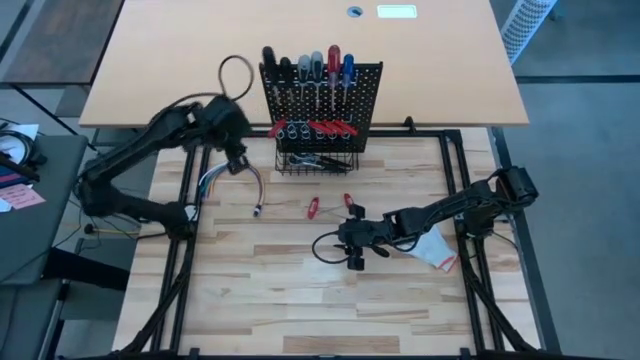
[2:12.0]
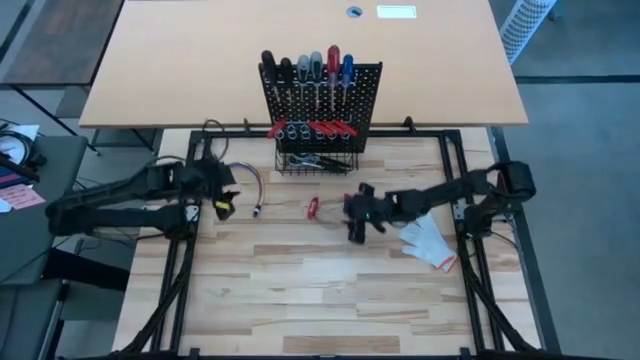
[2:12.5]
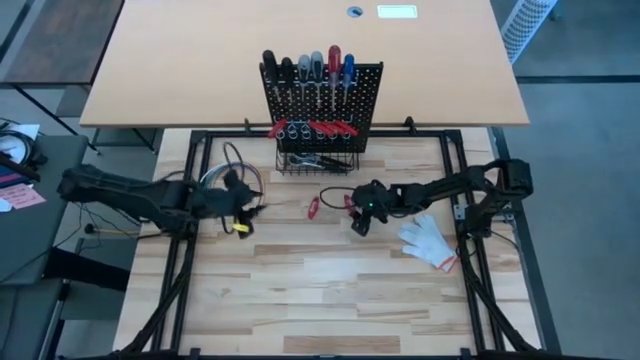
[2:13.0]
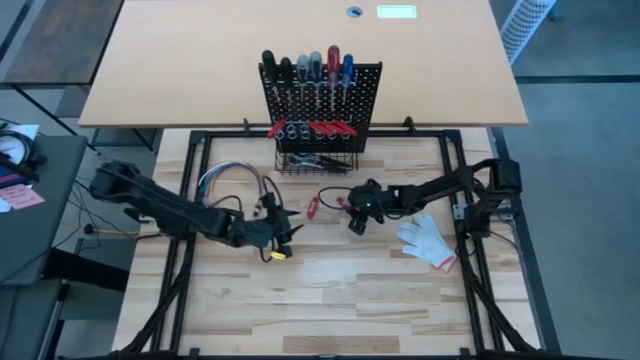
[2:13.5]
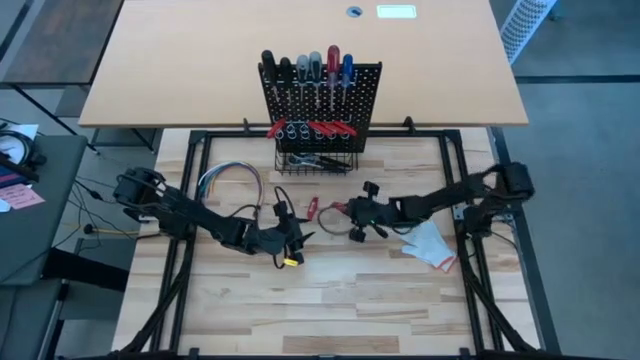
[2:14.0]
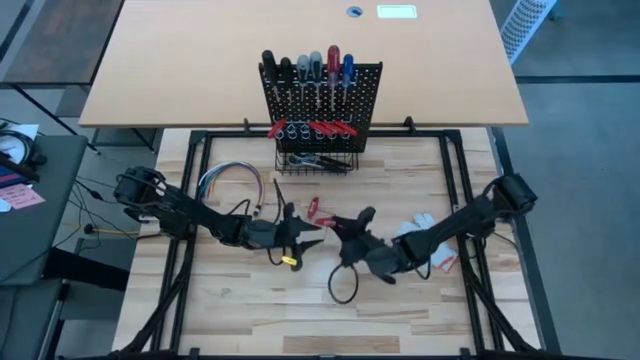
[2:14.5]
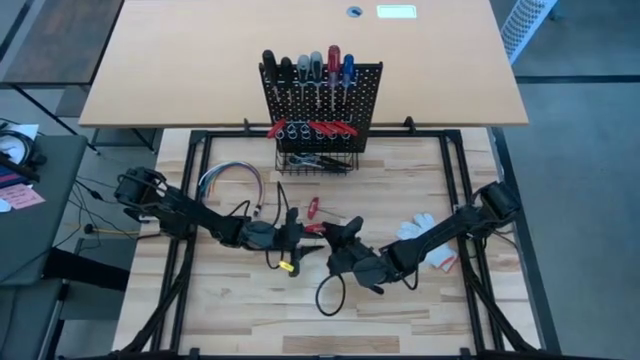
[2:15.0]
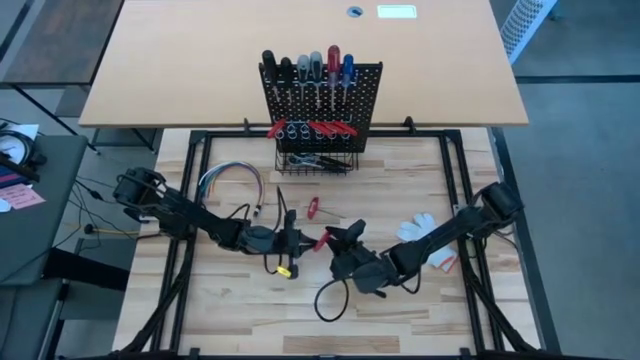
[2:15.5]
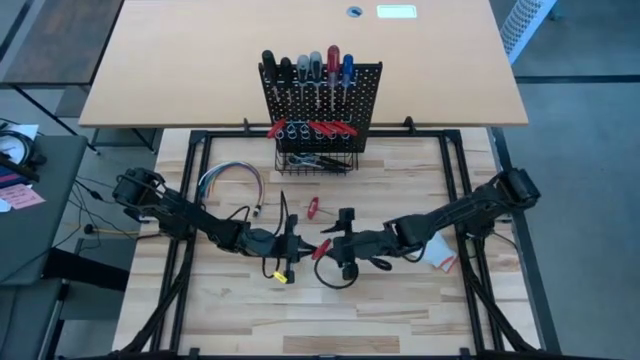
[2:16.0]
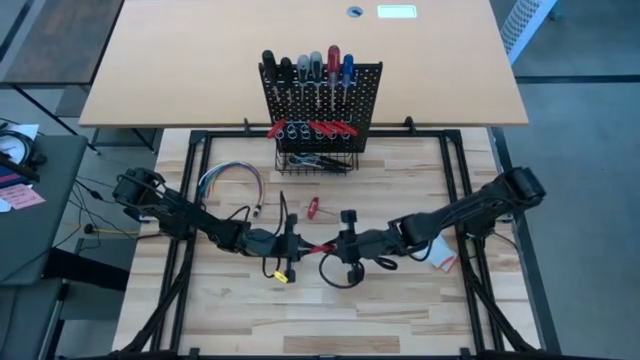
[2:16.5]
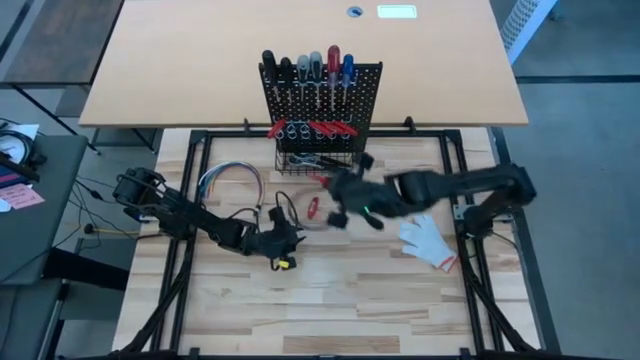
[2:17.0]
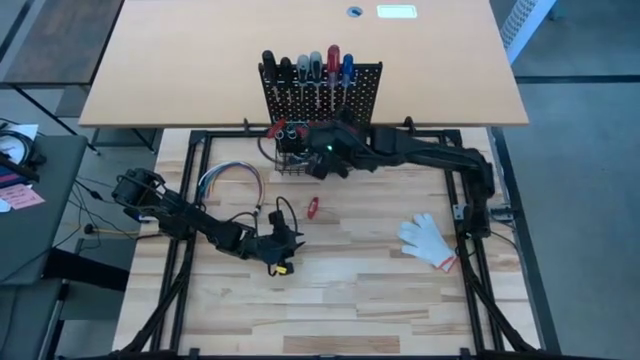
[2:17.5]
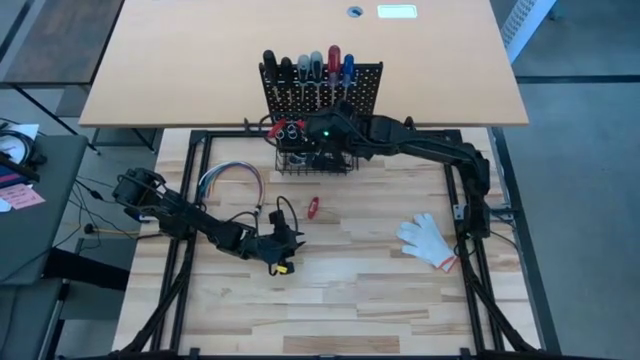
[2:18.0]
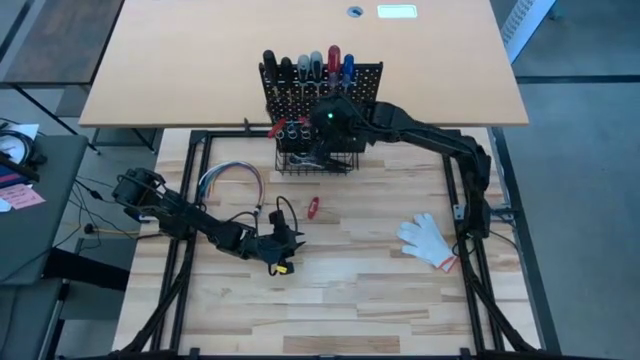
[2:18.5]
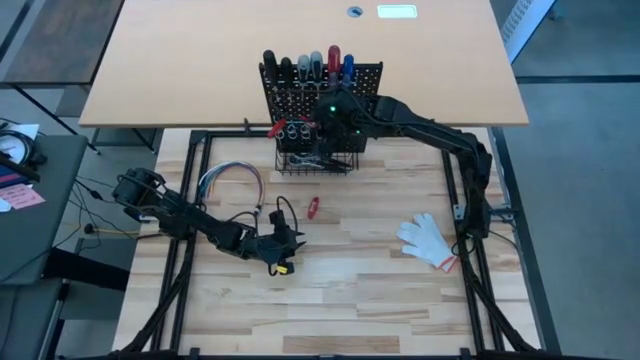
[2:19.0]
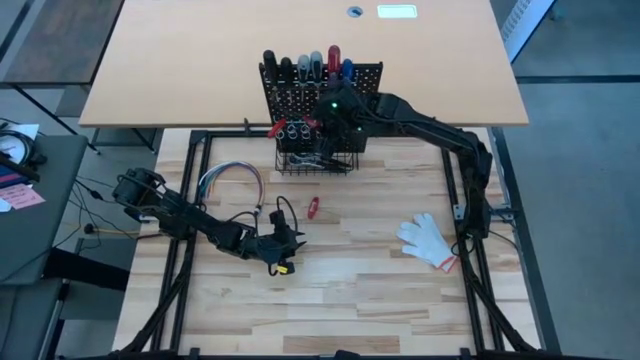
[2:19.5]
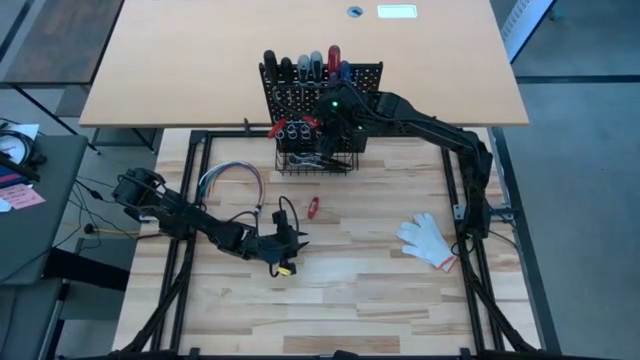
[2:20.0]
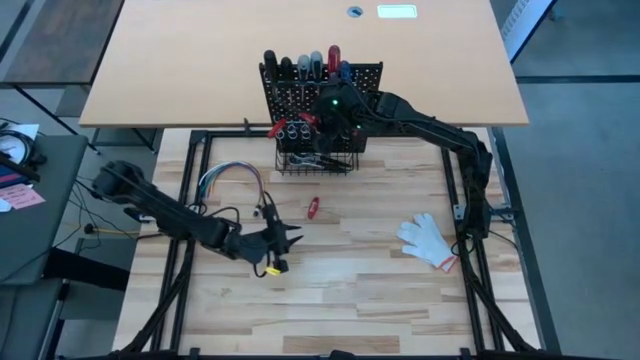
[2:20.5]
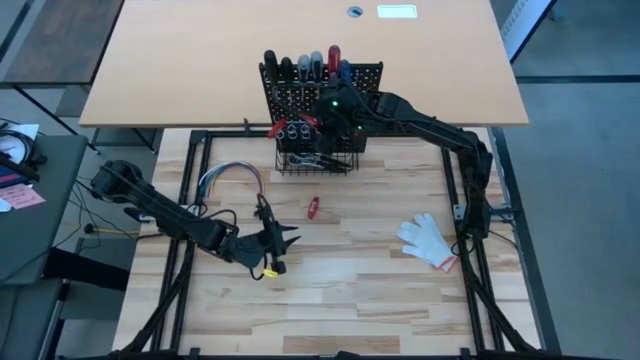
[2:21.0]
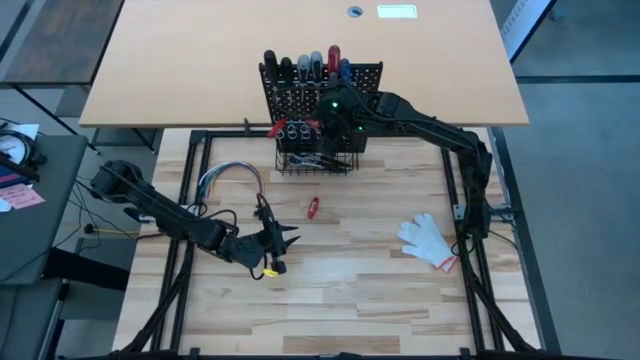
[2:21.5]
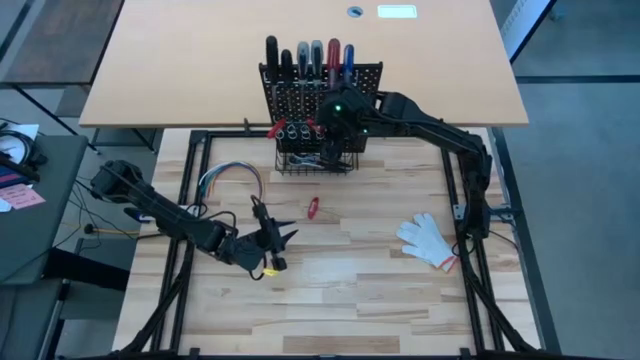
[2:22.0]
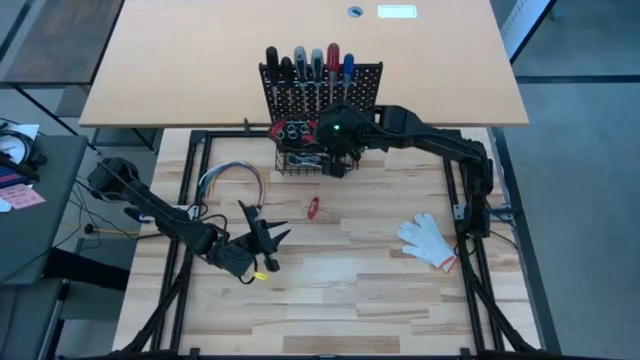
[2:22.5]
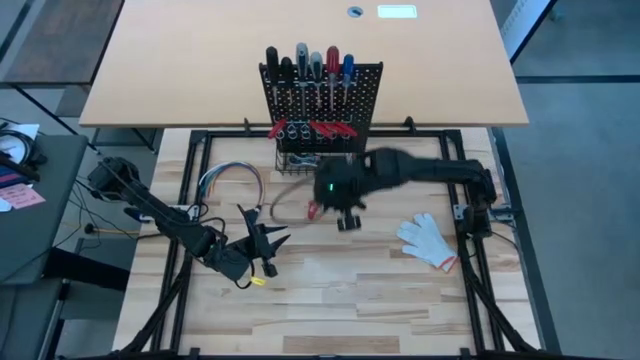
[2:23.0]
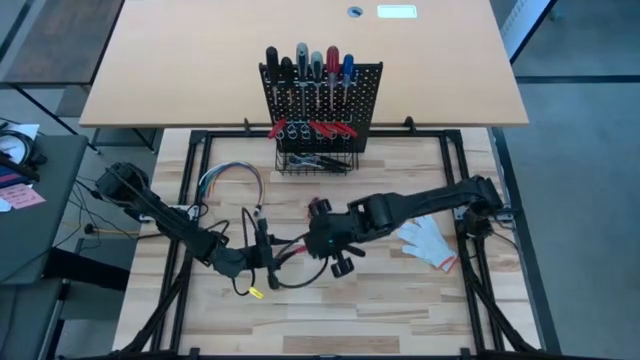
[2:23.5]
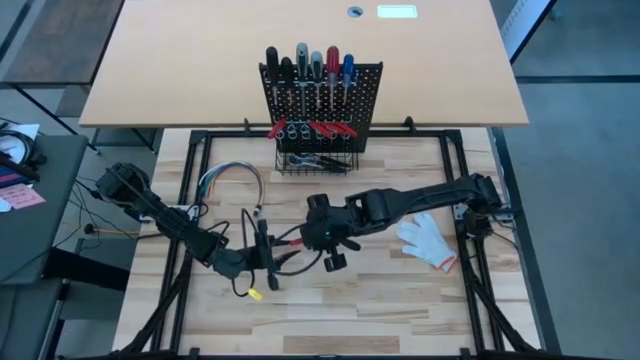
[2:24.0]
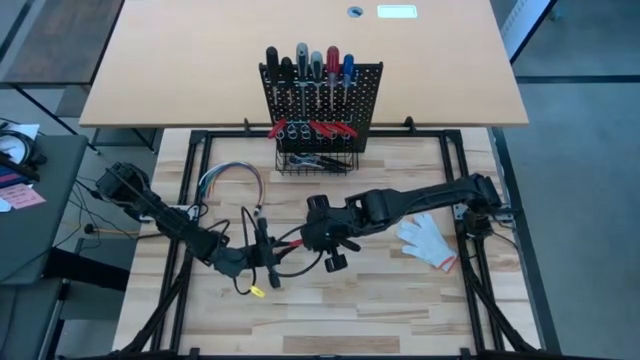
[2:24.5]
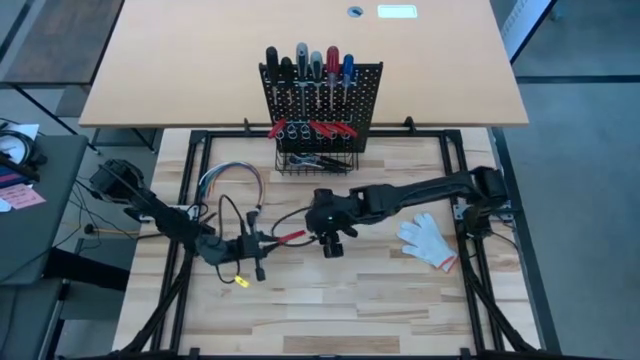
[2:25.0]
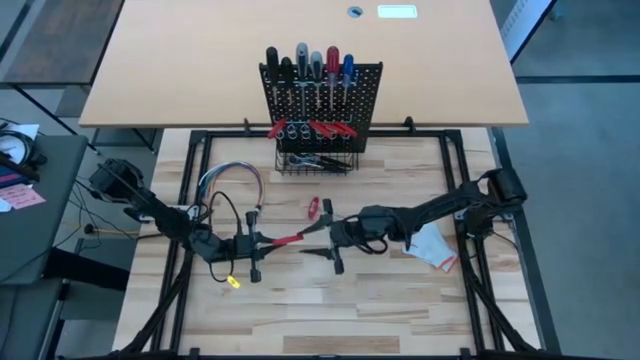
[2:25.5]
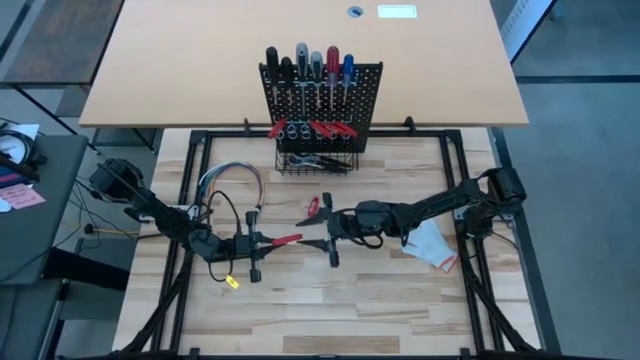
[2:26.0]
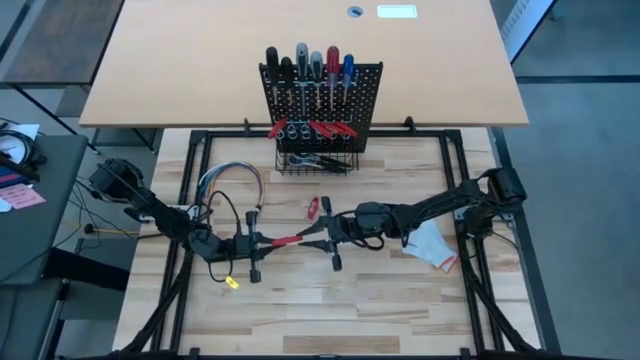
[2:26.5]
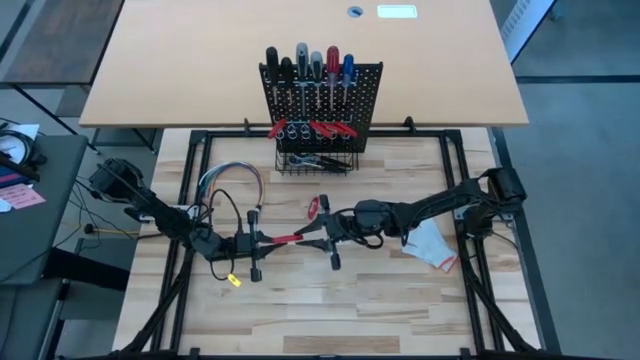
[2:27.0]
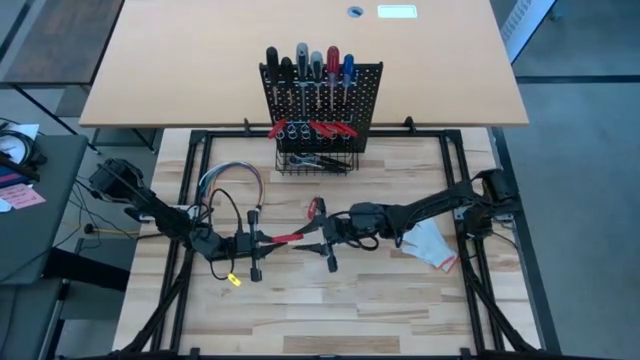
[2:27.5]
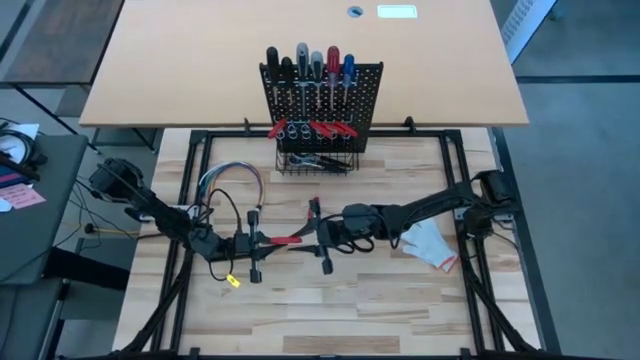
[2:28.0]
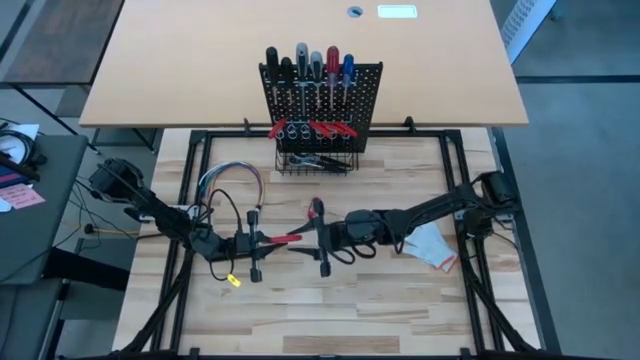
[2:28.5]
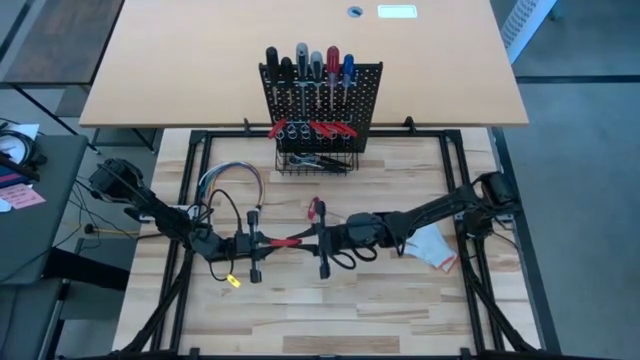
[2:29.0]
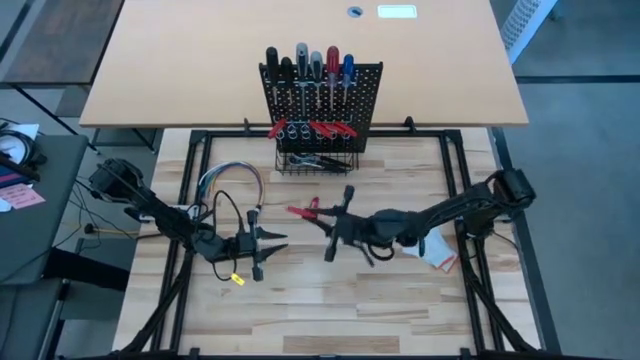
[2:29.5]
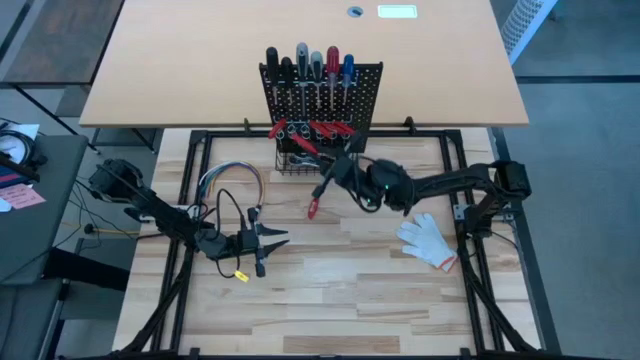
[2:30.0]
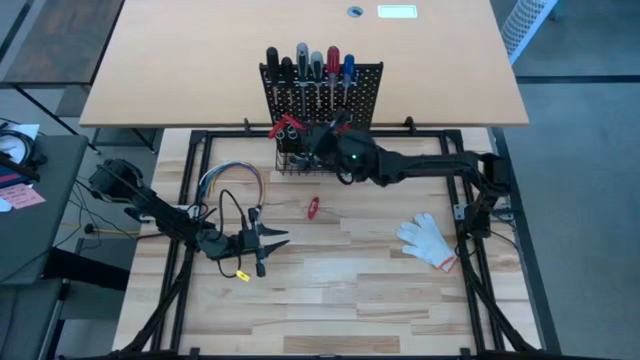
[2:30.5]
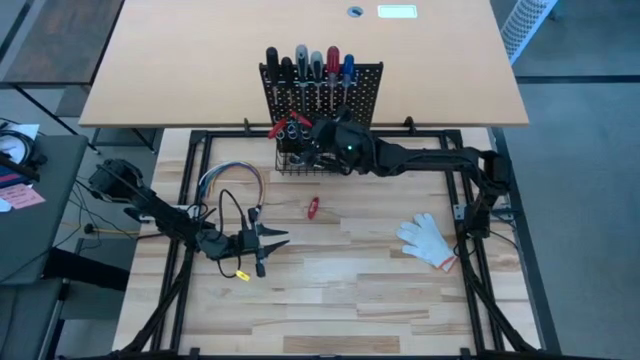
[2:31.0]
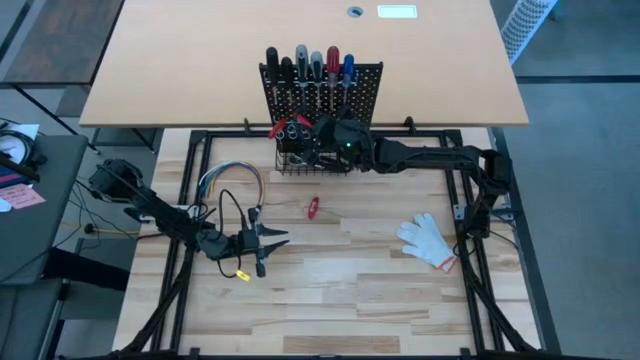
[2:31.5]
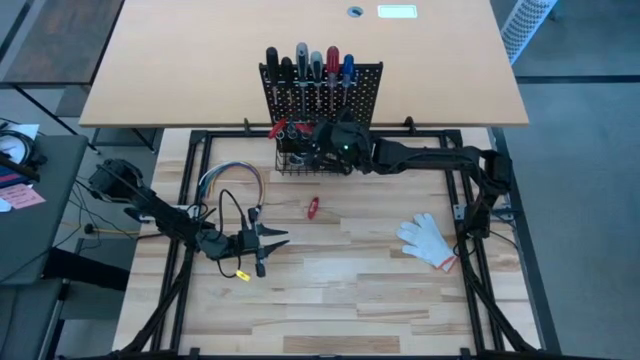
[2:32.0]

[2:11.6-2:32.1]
Task: Hang tools onto peg board
Hang the red allen wrench on the pegboard

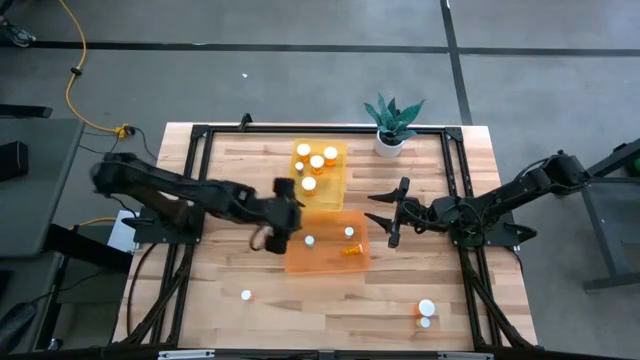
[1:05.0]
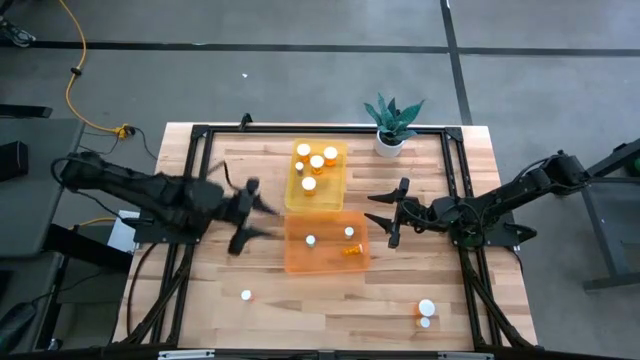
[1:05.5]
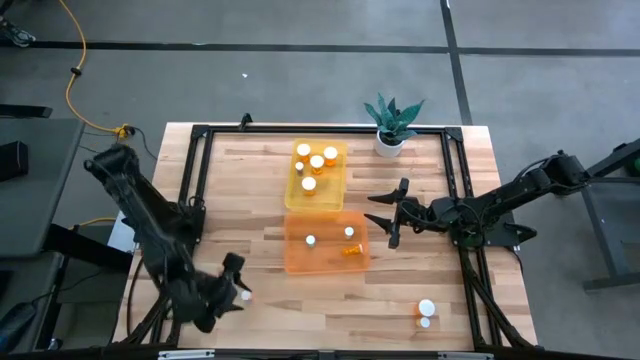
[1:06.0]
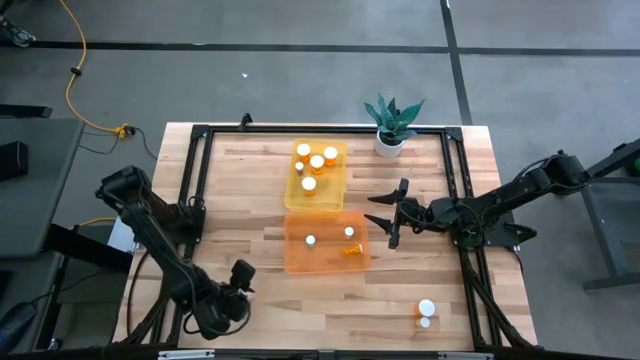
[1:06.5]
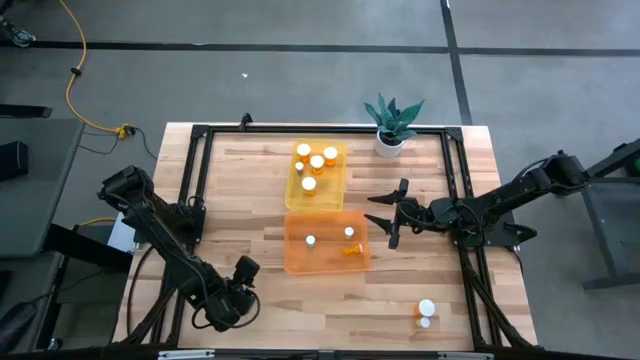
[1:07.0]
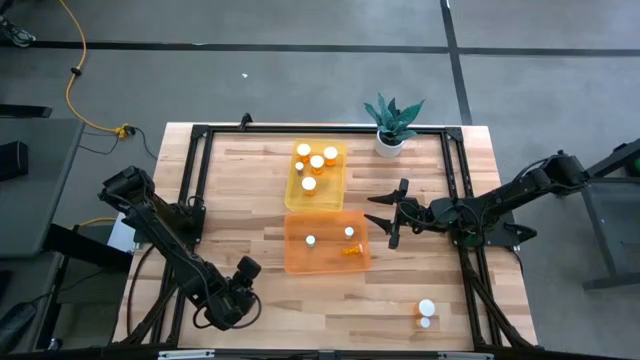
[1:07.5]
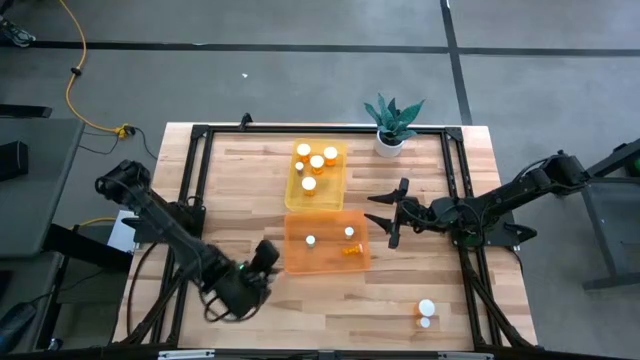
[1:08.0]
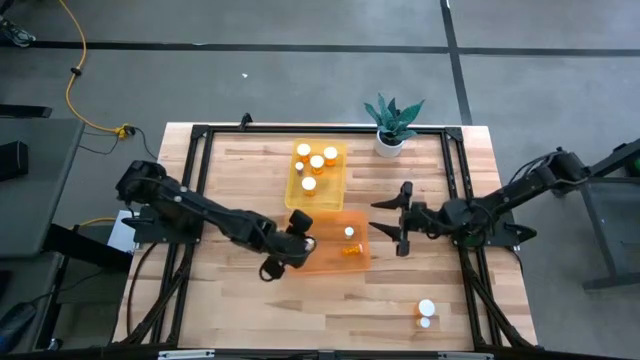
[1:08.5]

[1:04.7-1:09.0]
Task: Pick and place medicine bottles into bin by pill shape (circle, oval)
Put the pink tablet bottle into the orange bin
